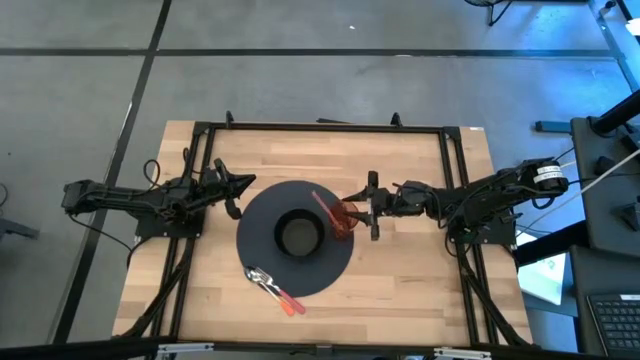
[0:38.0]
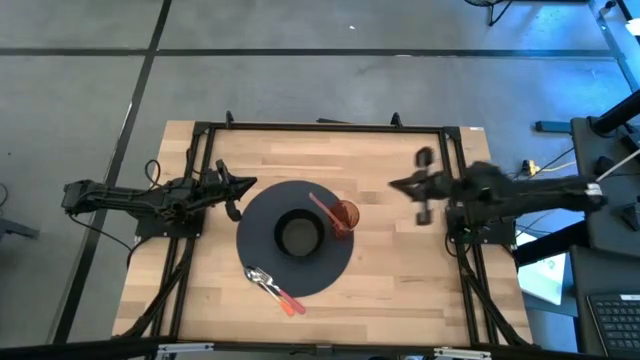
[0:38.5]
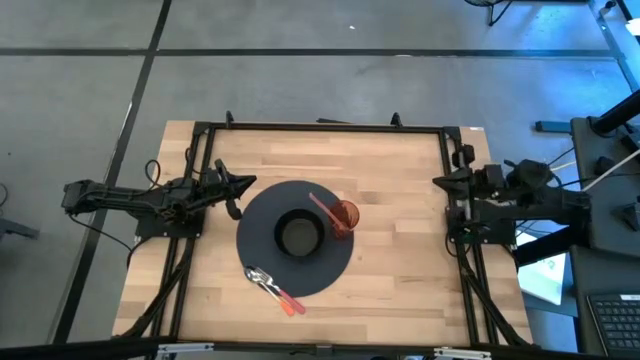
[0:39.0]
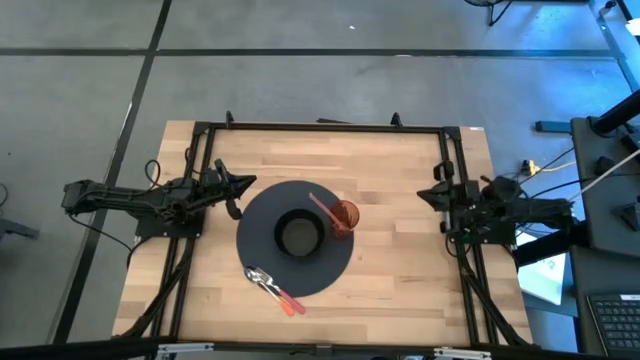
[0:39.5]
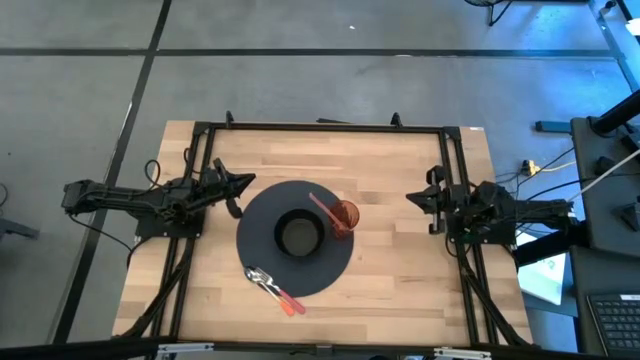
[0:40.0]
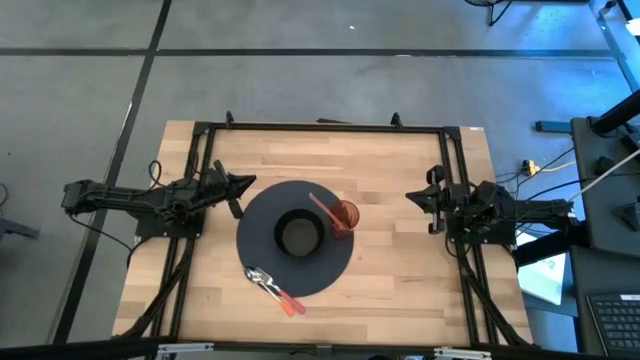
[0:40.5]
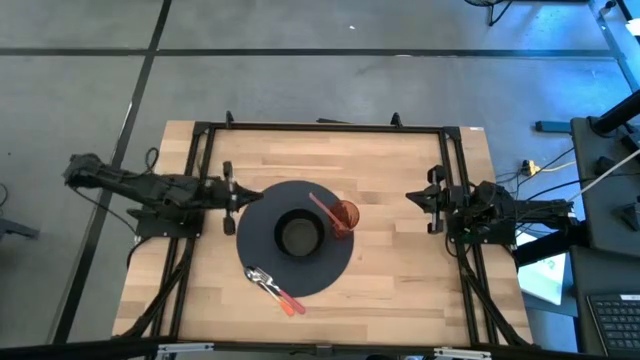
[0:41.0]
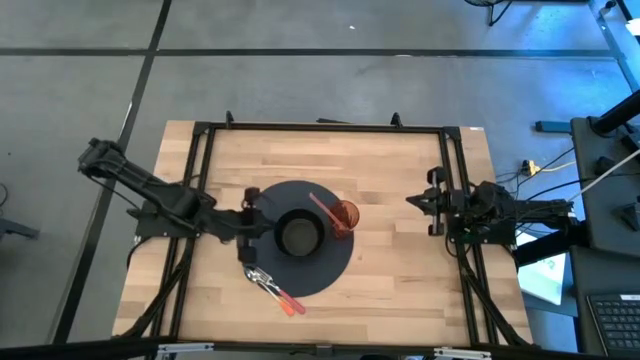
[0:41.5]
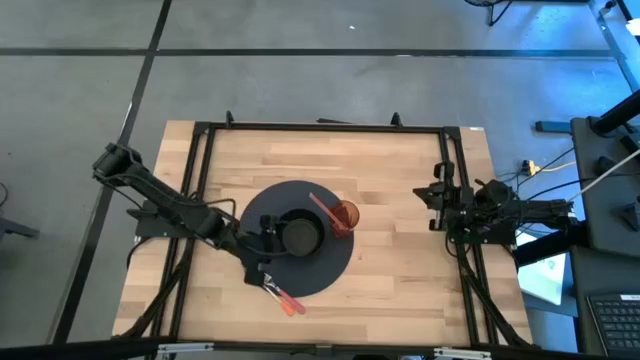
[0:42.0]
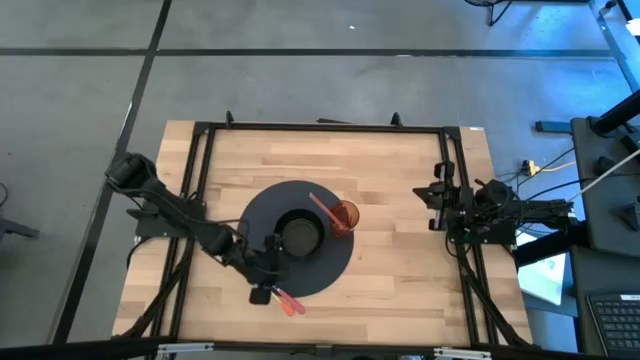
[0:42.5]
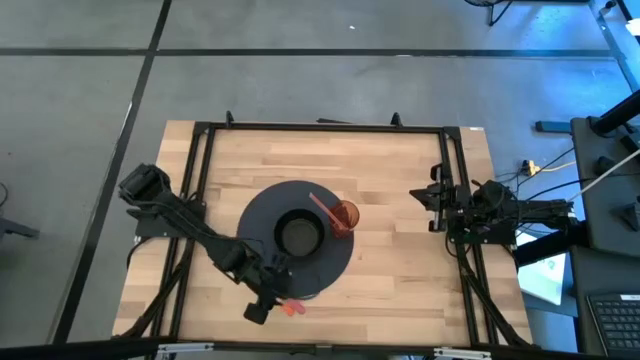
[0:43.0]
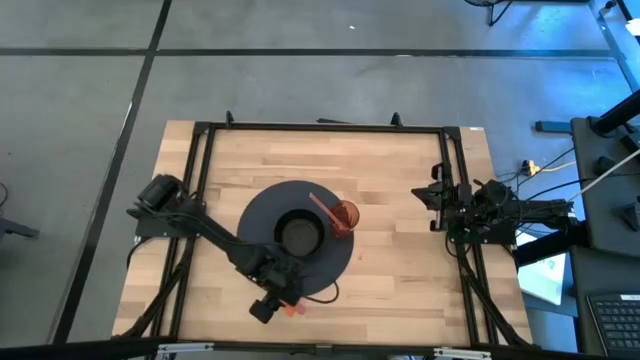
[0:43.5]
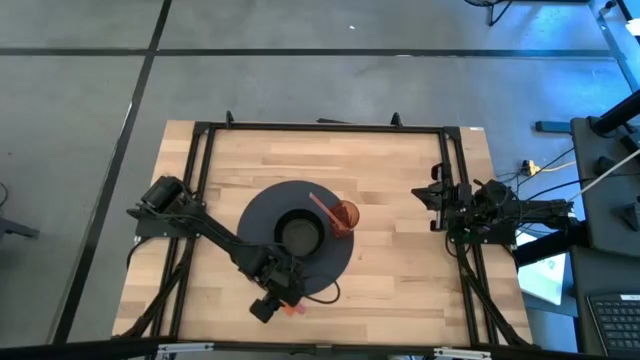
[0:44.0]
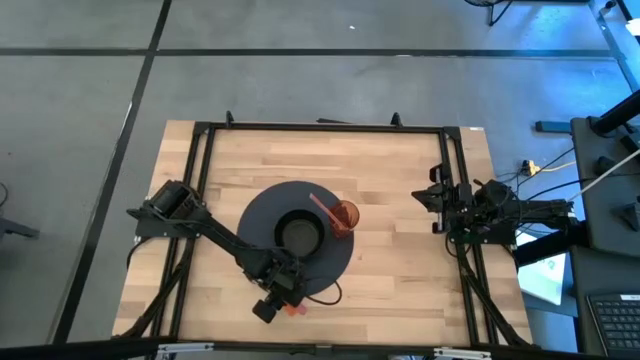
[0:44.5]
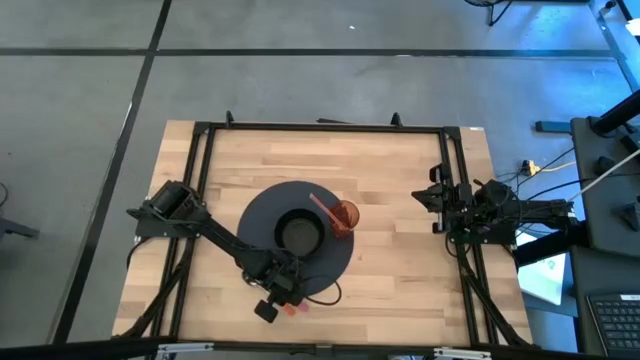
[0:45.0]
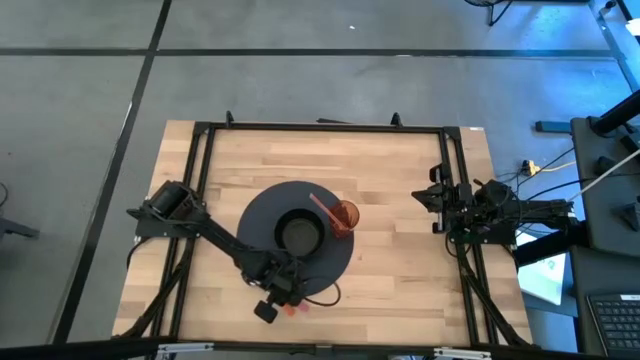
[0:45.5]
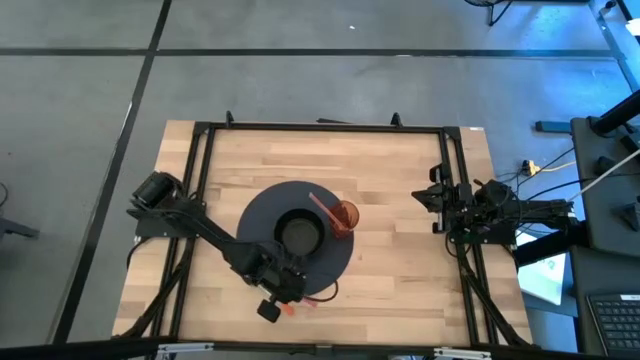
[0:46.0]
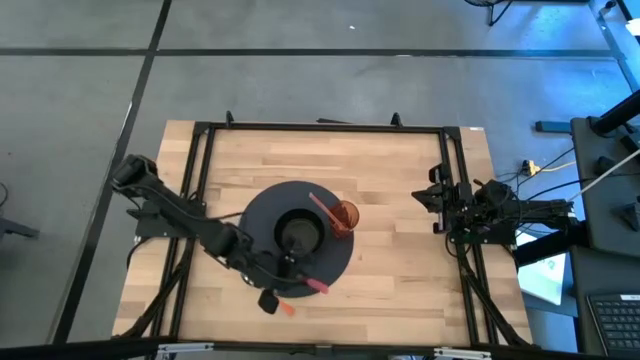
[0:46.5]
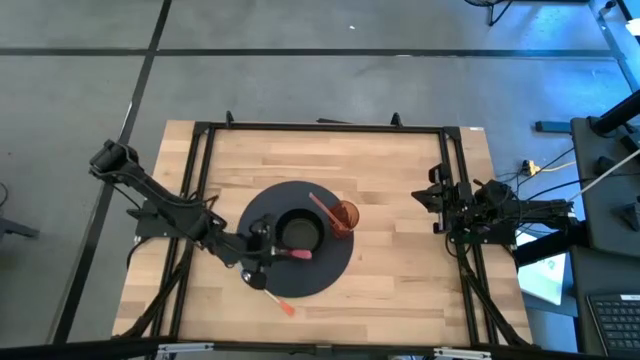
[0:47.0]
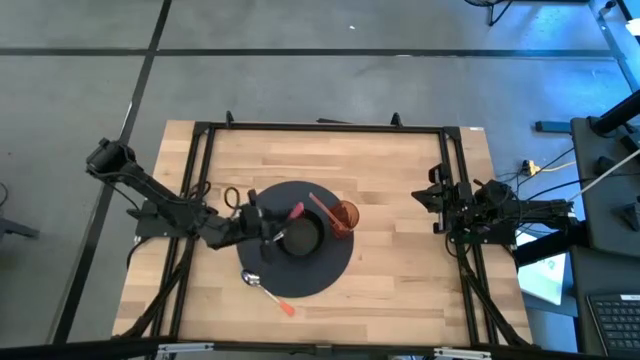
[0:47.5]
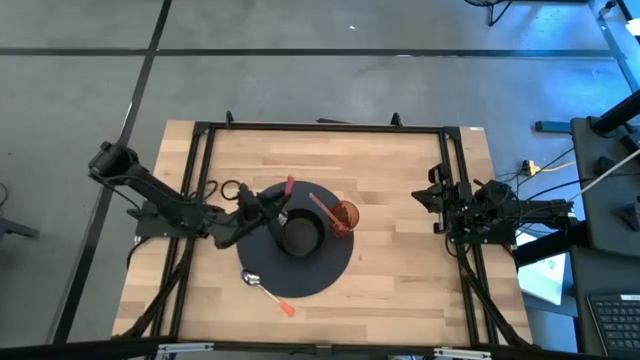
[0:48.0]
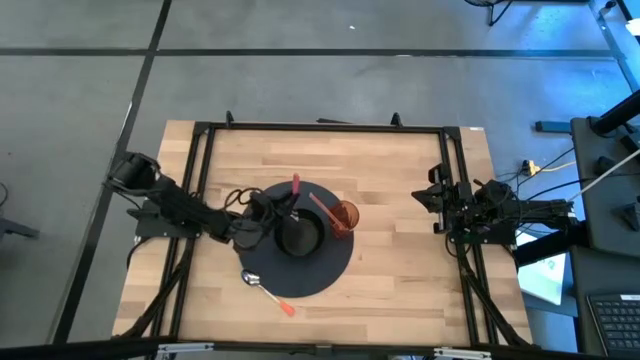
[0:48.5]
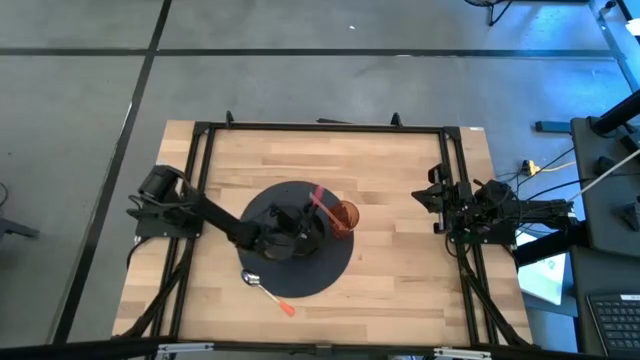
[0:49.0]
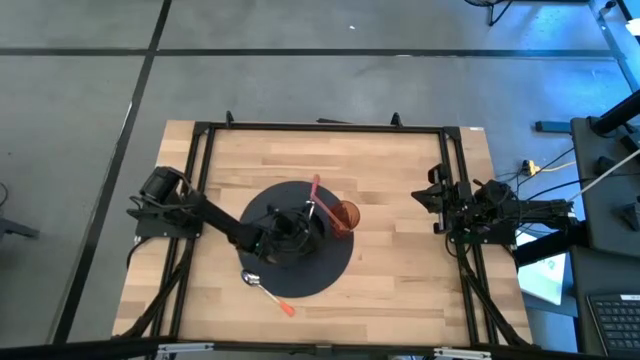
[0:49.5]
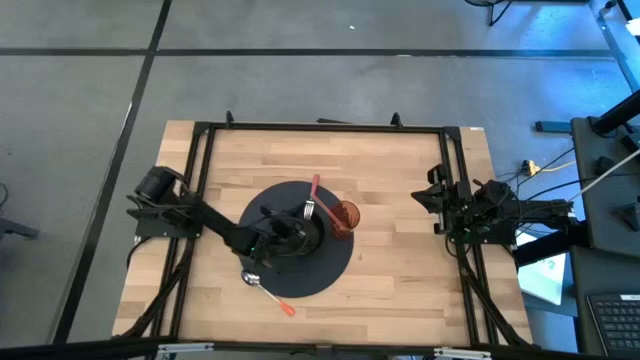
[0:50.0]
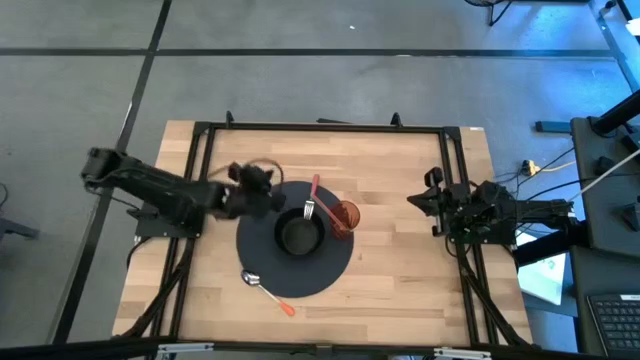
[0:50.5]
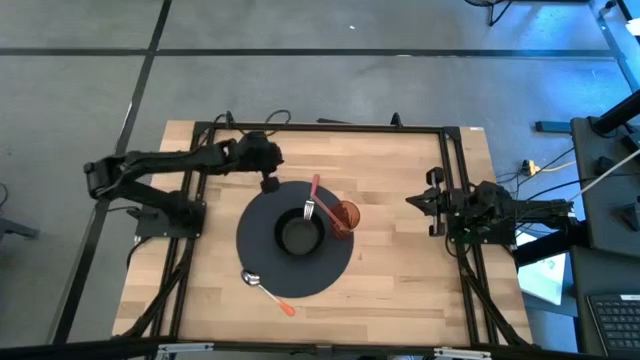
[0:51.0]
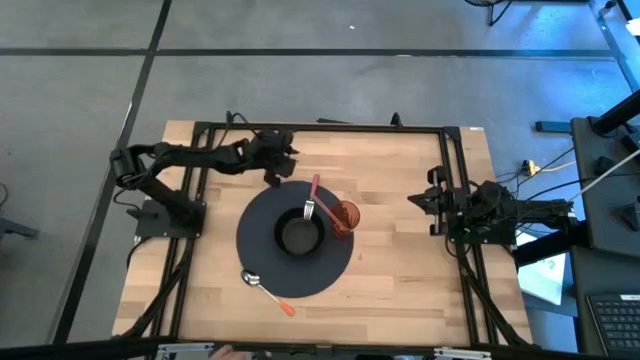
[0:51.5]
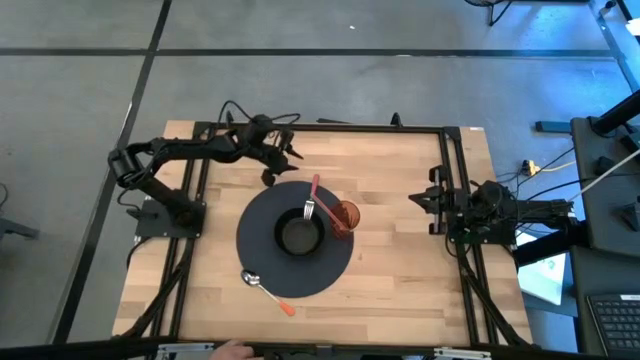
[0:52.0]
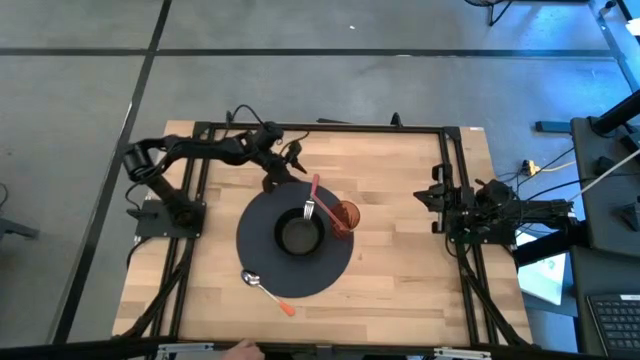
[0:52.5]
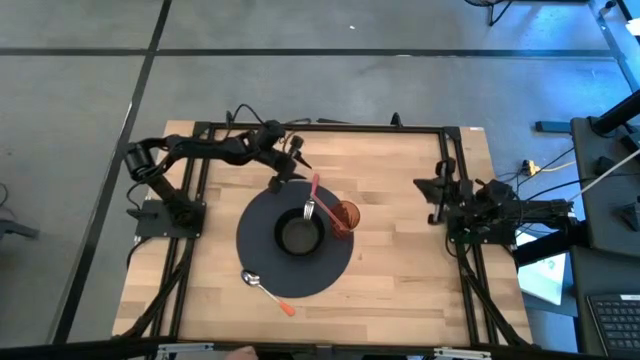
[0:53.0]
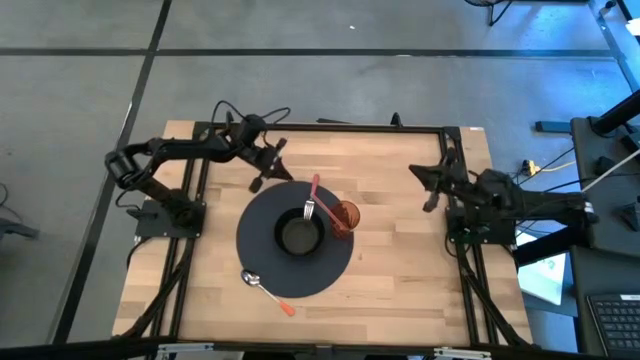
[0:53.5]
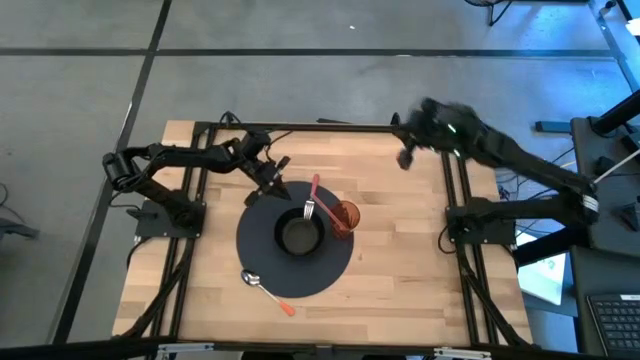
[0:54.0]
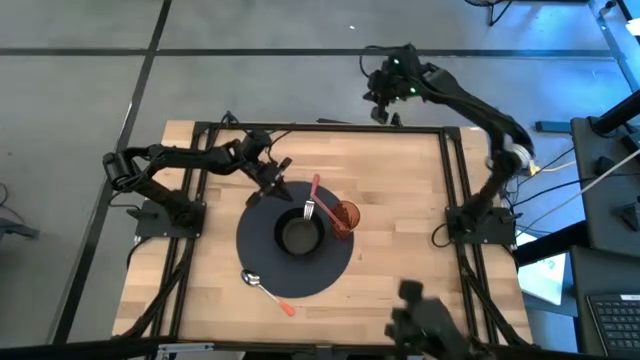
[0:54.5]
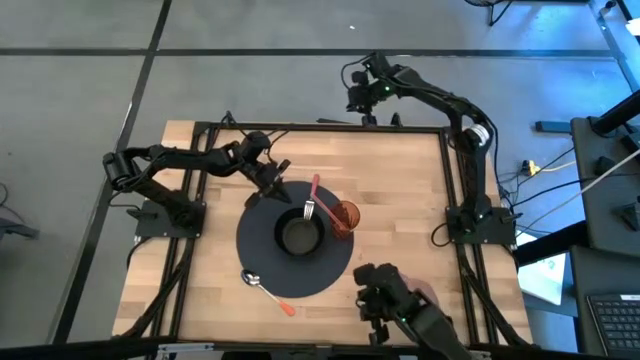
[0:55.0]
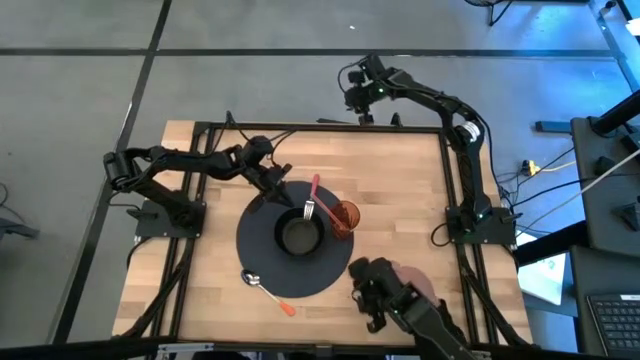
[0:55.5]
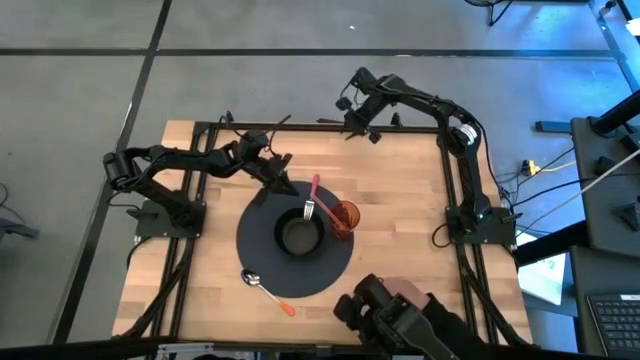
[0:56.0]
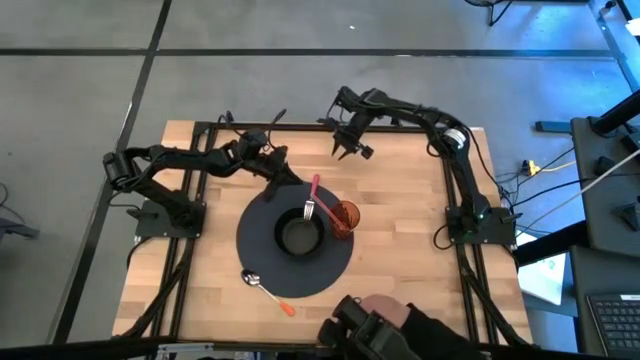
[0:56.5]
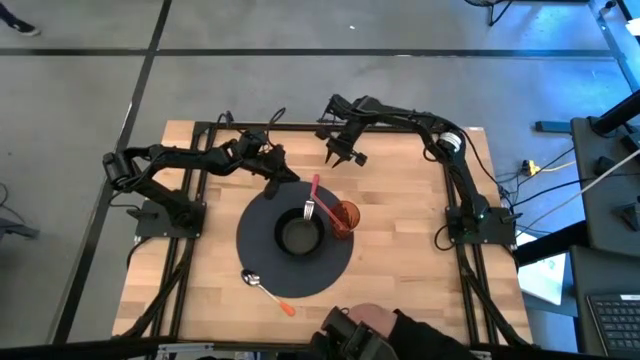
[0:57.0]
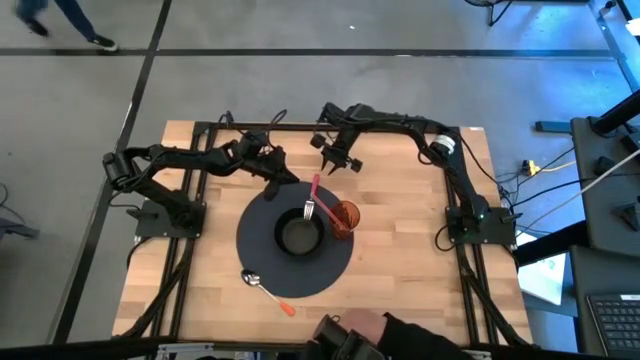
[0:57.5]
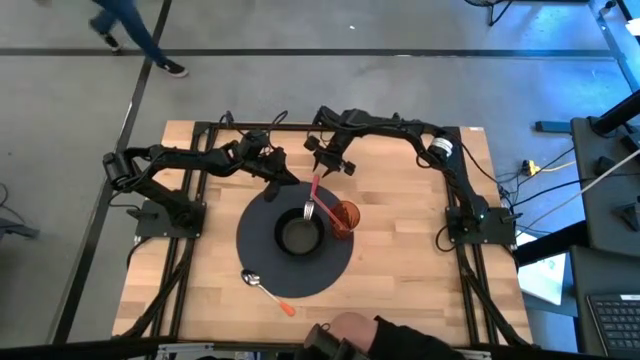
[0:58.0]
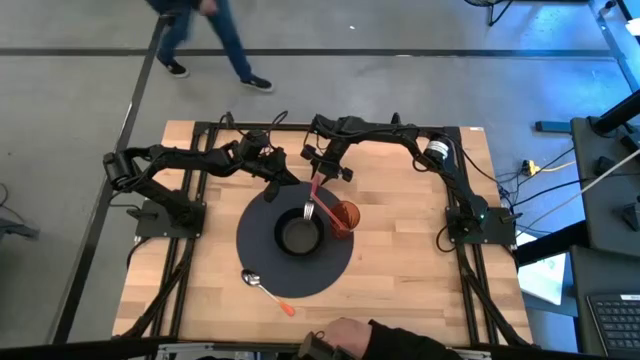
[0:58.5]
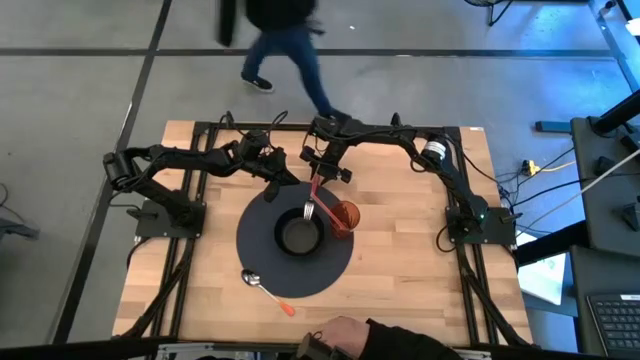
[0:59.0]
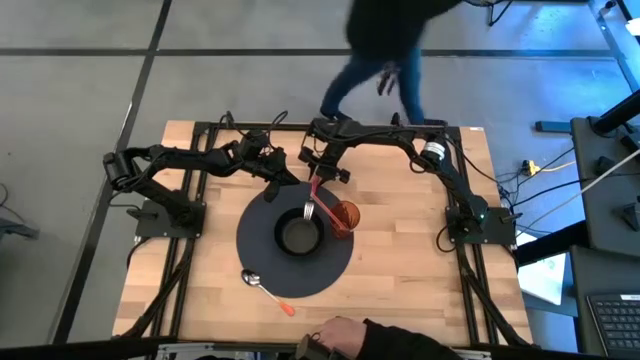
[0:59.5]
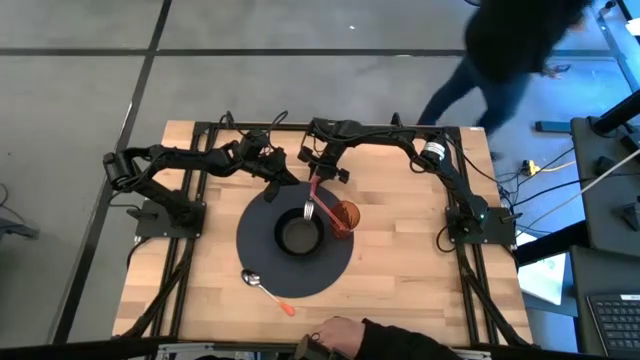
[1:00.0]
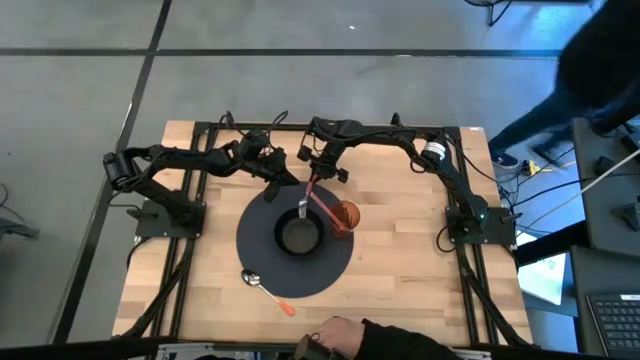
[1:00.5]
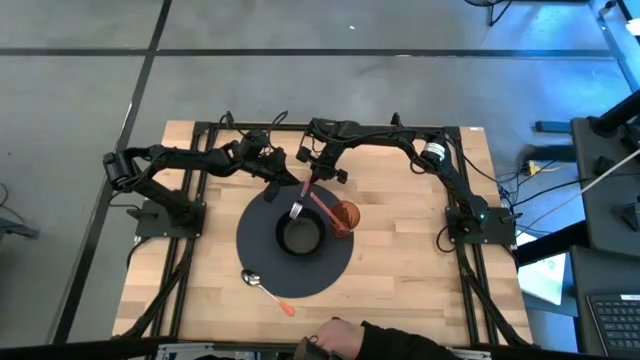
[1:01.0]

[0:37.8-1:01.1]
Task: Pick & Place Utensil
Put the pink fork into the black bowl
